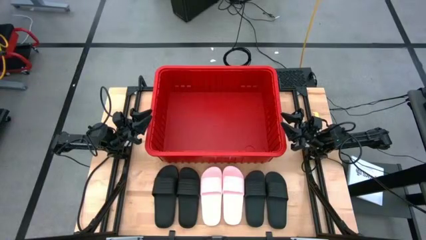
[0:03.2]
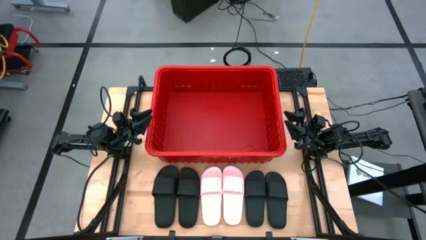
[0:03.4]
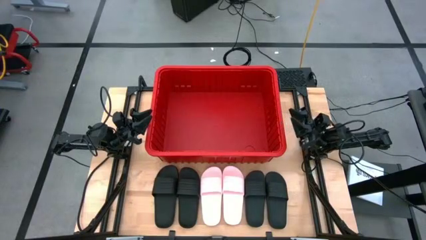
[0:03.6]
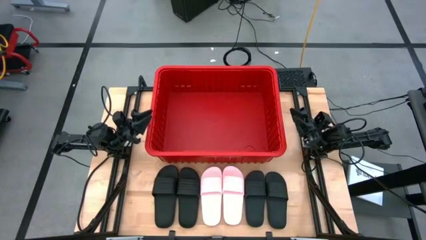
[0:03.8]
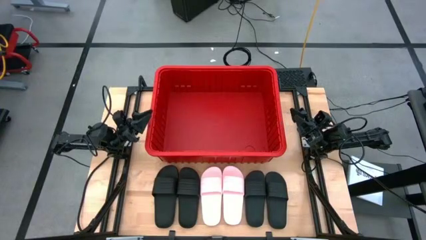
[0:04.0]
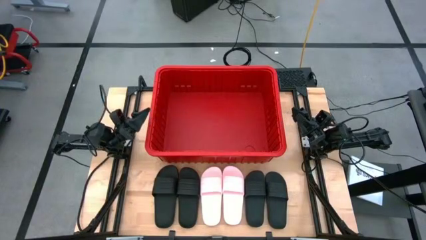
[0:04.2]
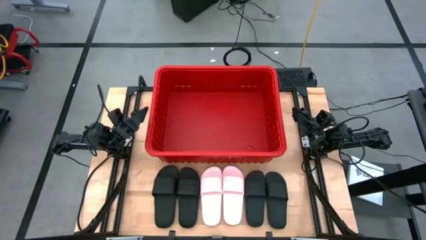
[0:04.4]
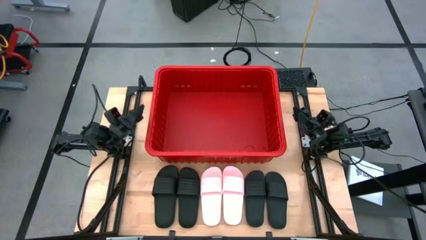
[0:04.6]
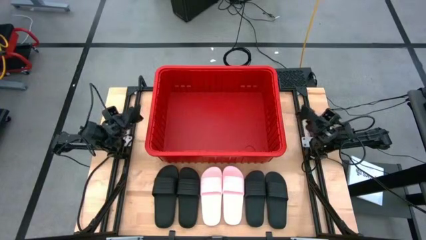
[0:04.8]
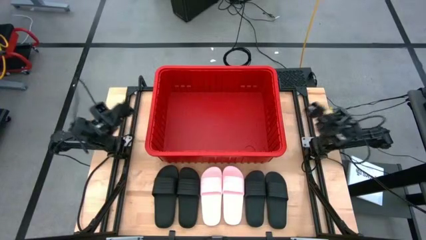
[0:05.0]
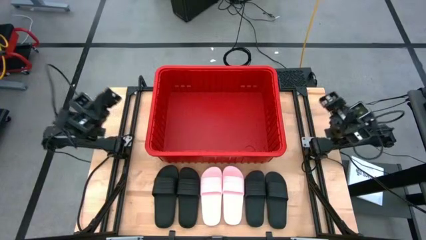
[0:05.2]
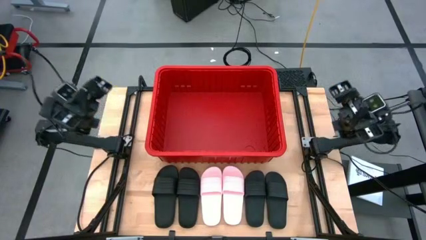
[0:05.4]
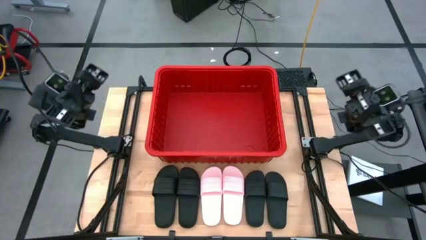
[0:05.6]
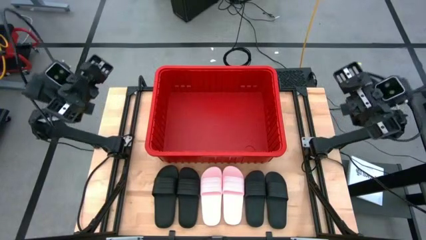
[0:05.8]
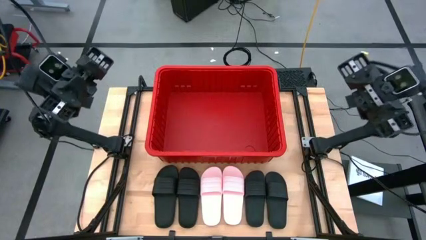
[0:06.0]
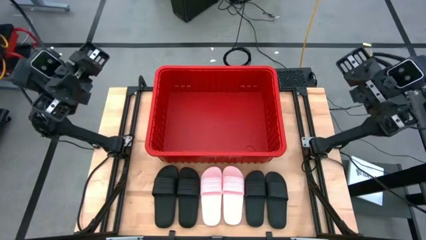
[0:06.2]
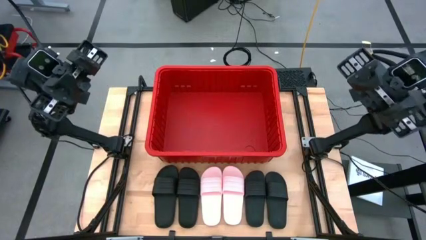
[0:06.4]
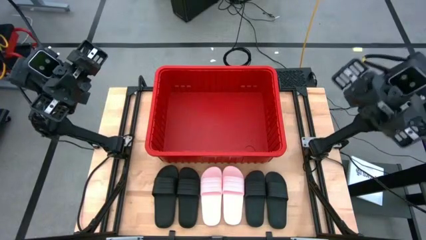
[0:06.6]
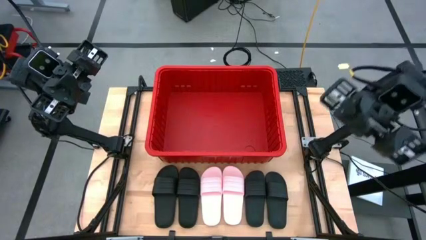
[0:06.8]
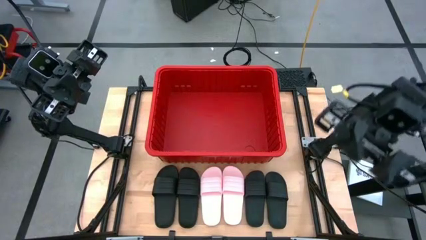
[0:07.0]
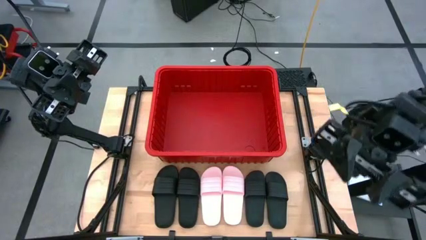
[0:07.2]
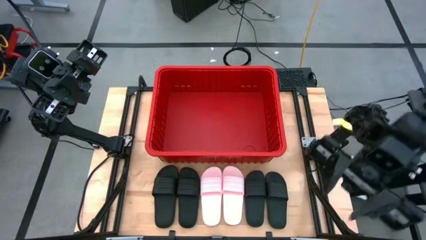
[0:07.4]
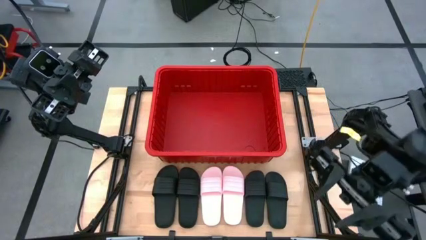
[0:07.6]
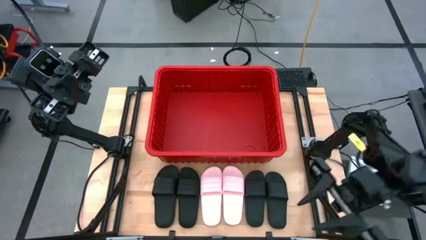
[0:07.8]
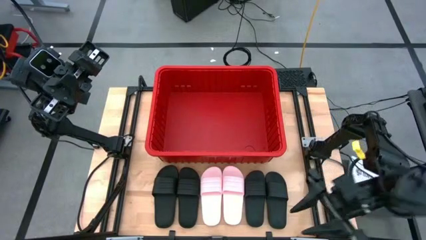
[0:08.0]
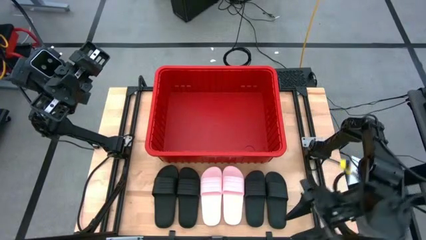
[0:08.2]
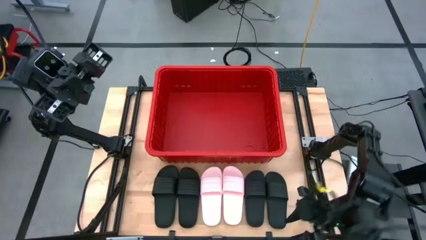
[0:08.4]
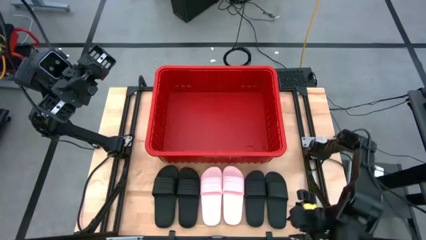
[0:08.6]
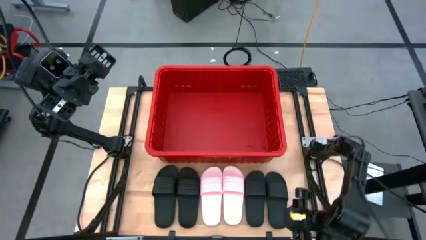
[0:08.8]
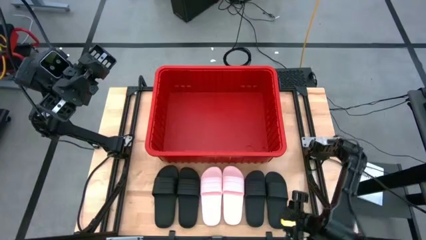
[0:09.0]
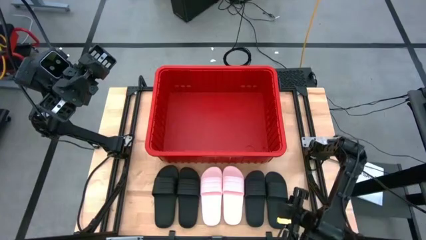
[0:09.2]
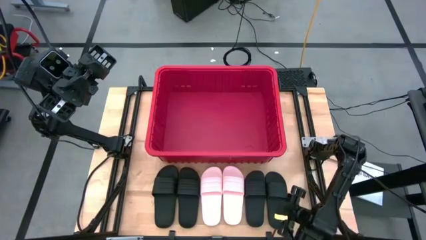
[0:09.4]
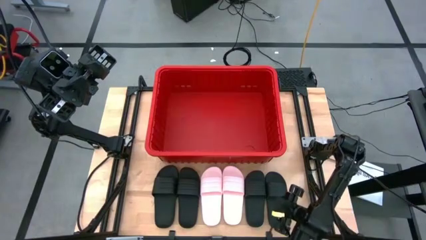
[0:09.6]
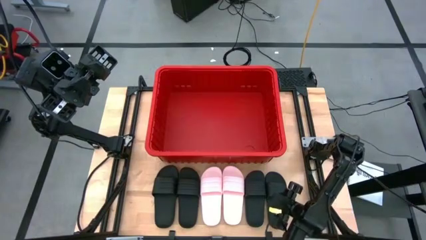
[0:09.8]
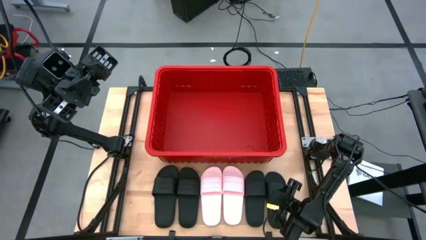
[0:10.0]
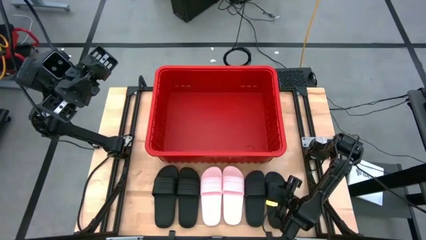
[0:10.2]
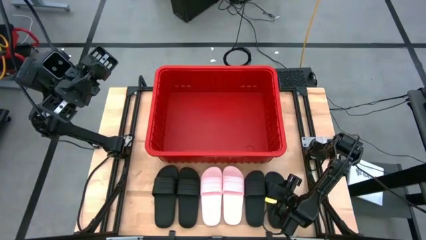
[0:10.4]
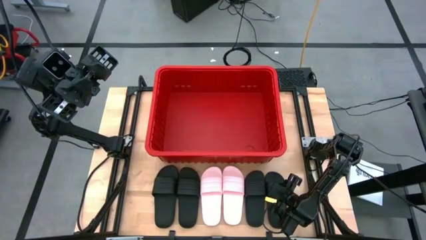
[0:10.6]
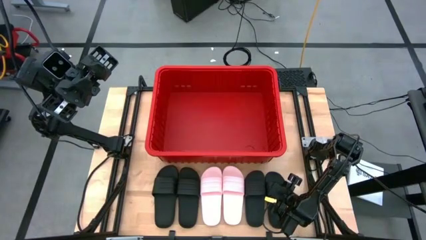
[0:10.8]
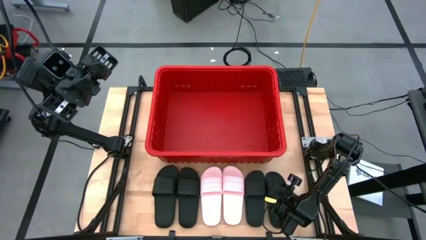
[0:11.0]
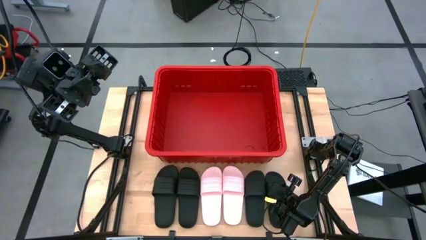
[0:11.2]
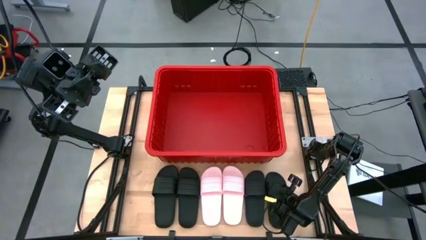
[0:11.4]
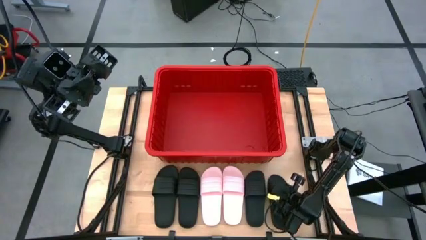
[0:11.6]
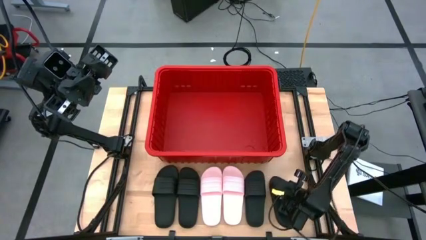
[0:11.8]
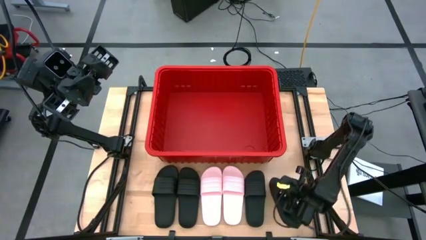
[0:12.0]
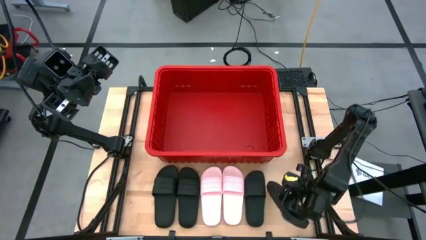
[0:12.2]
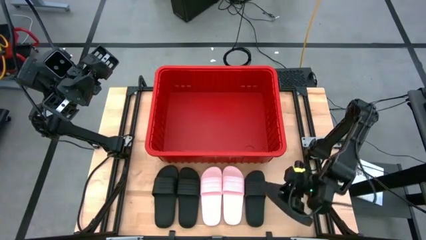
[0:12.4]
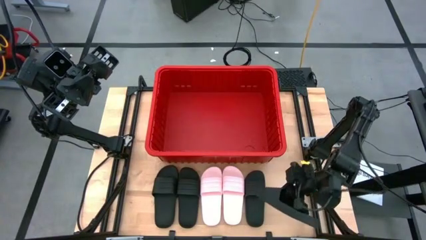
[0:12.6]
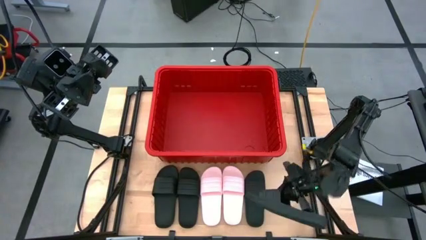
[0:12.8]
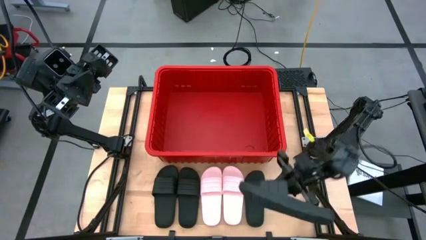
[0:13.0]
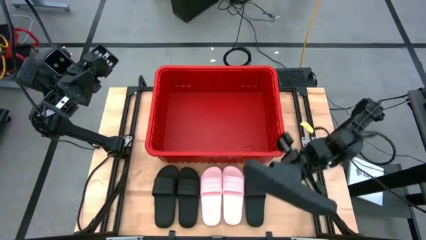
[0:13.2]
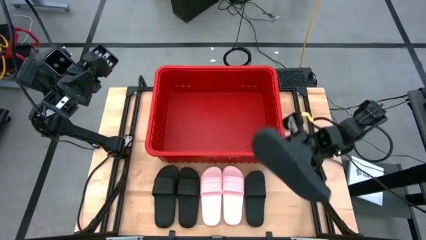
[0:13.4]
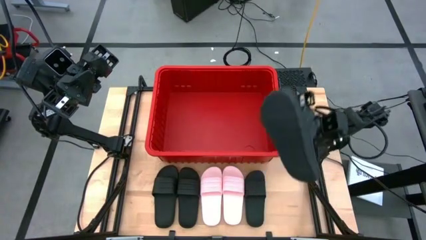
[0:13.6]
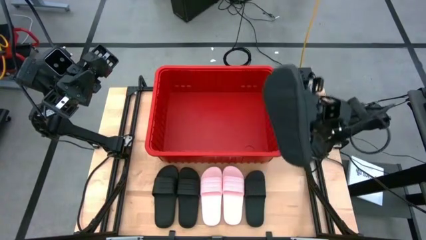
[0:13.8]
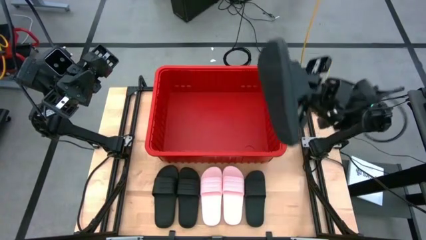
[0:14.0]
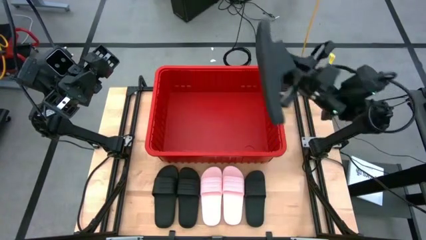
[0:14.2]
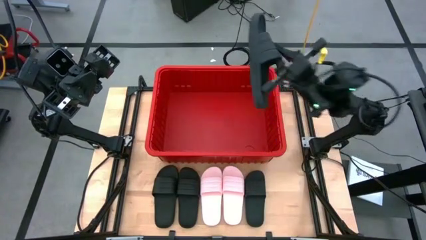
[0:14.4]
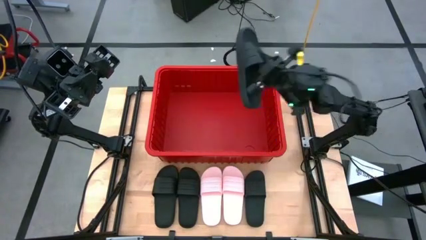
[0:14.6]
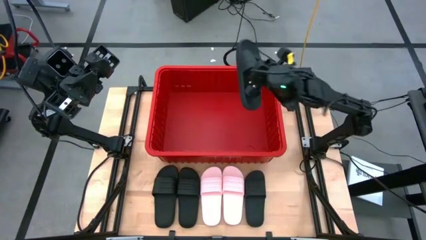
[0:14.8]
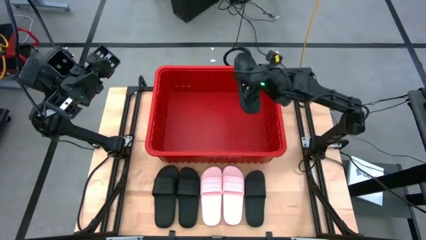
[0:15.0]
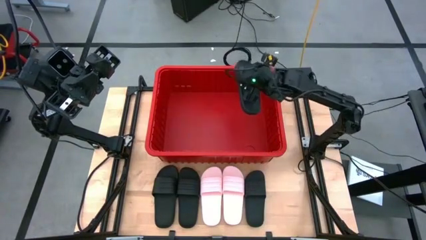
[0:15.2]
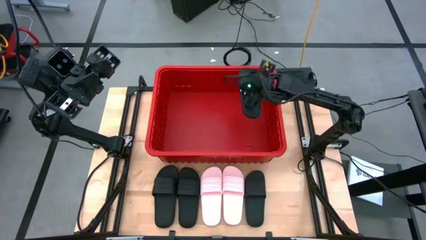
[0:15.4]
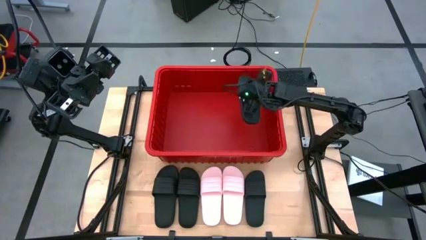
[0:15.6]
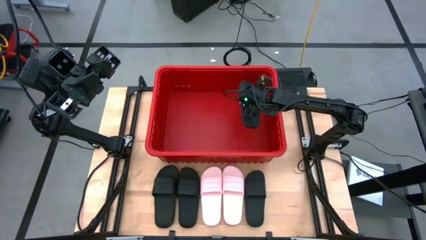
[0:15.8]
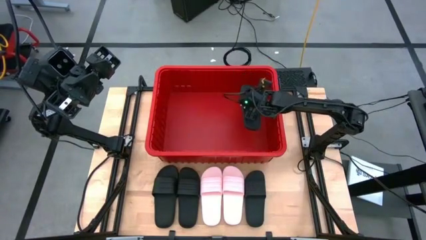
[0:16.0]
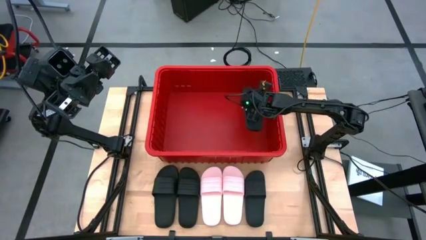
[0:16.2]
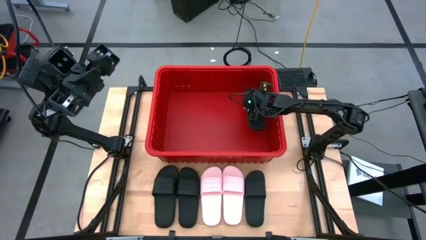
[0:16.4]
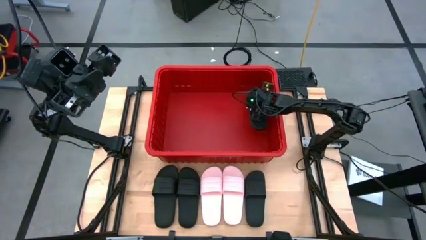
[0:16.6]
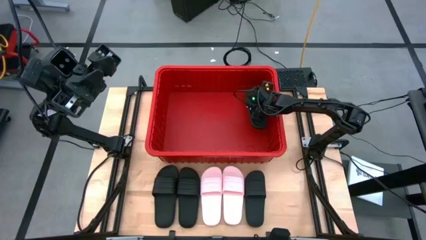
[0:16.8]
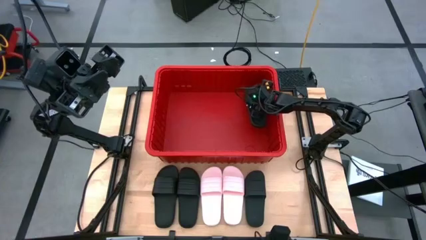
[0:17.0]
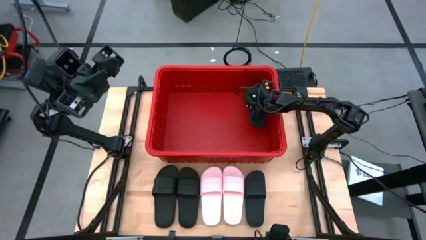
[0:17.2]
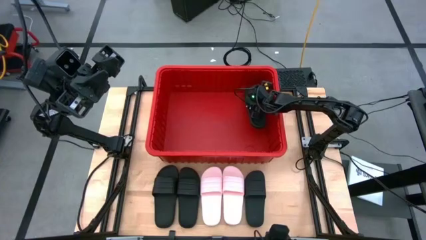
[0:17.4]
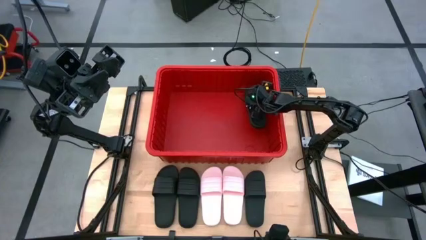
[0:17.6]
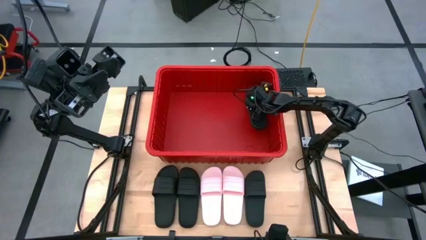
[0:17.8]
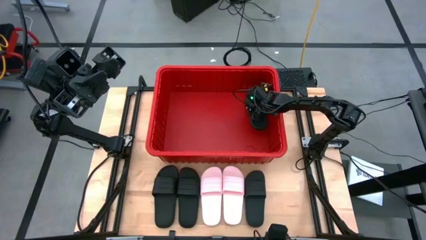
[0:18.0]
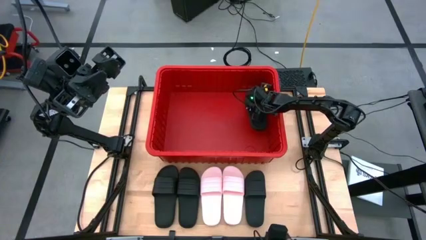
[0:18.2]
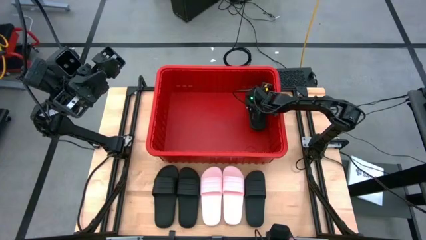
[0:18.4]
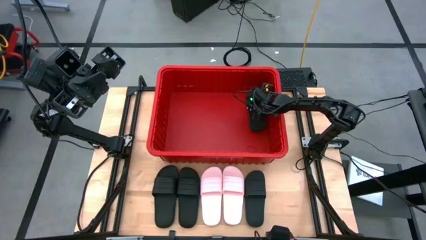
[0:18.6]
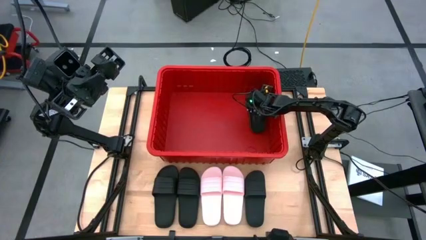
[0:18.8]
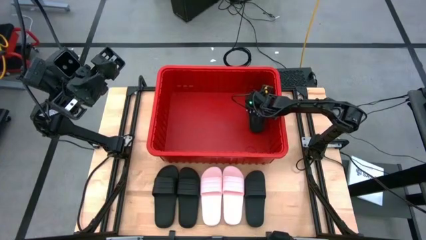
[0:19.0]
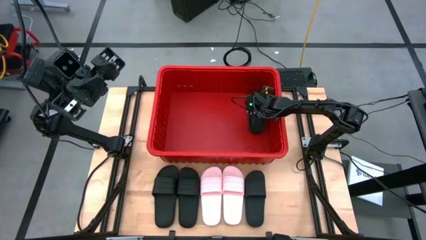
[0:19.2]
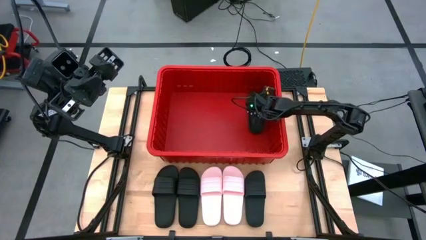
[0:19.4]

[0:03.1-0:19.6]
Task: Pick and place slides into bin
Put the black slide into the red bin
